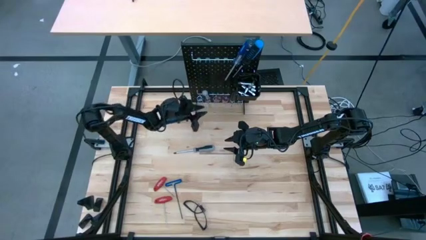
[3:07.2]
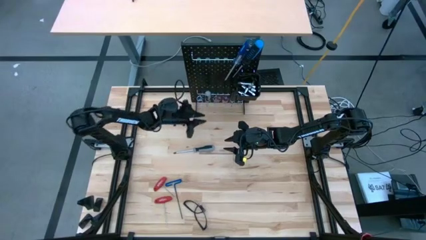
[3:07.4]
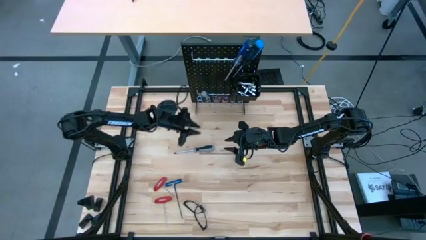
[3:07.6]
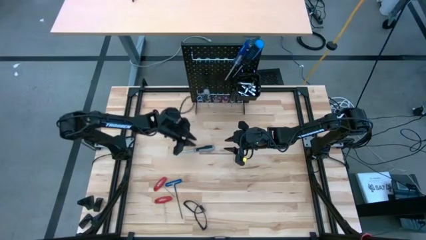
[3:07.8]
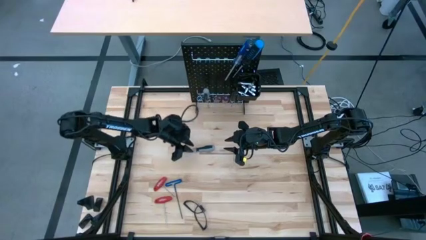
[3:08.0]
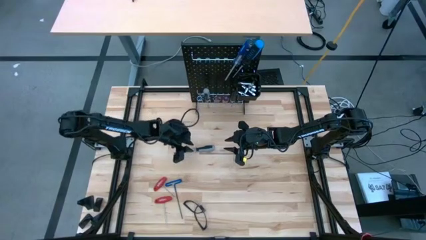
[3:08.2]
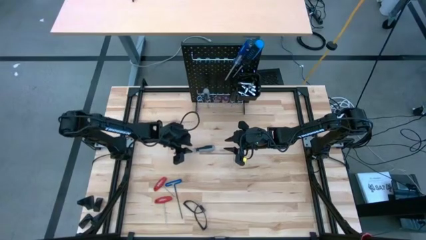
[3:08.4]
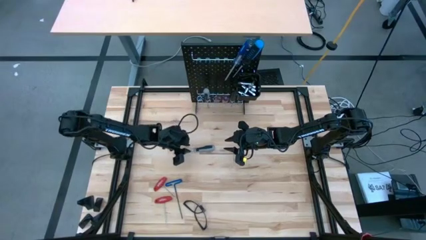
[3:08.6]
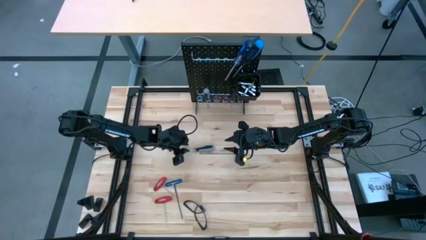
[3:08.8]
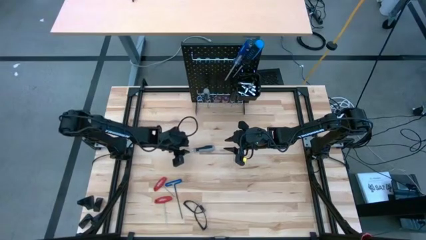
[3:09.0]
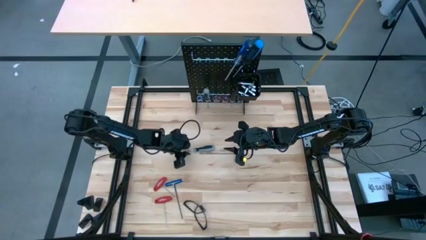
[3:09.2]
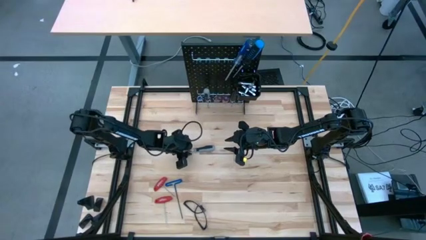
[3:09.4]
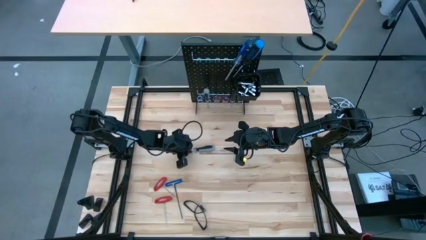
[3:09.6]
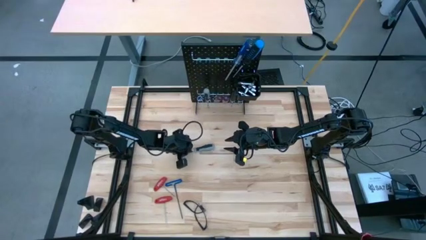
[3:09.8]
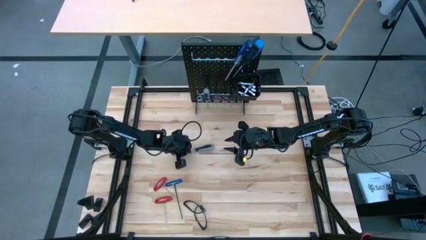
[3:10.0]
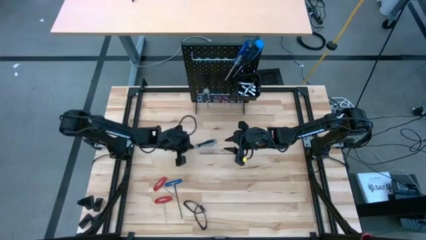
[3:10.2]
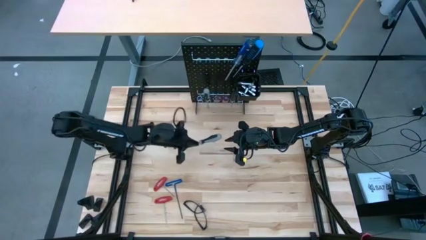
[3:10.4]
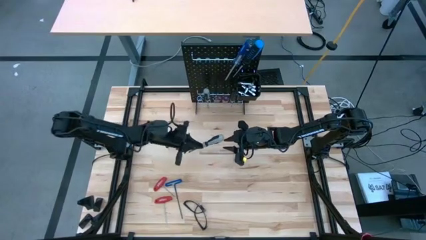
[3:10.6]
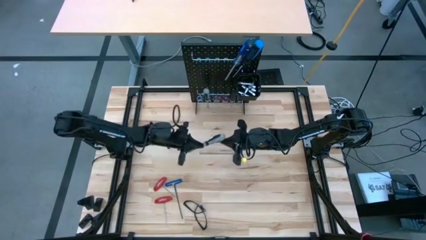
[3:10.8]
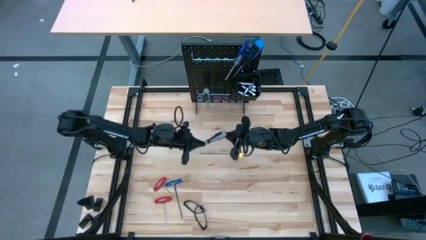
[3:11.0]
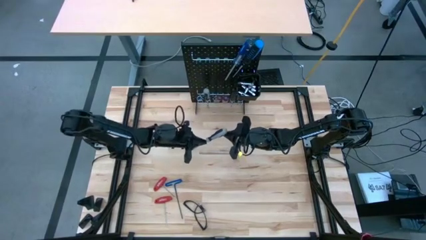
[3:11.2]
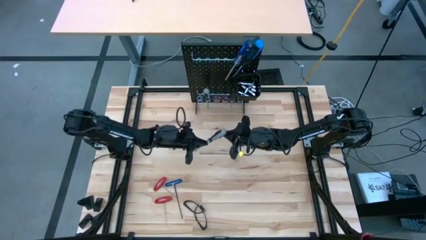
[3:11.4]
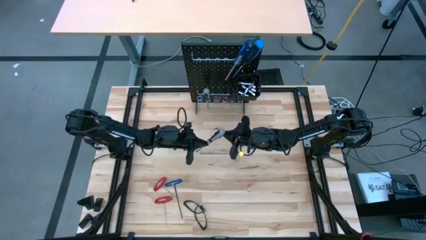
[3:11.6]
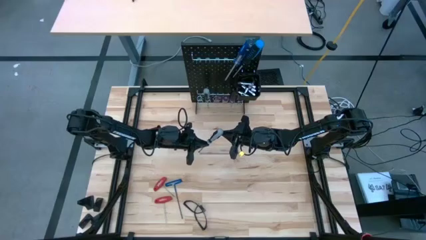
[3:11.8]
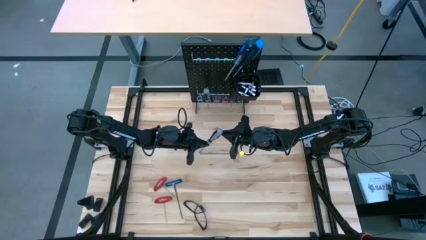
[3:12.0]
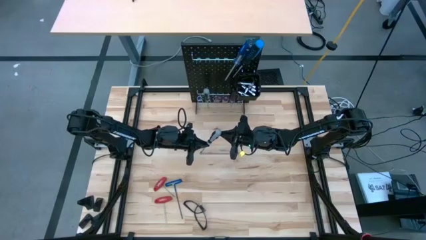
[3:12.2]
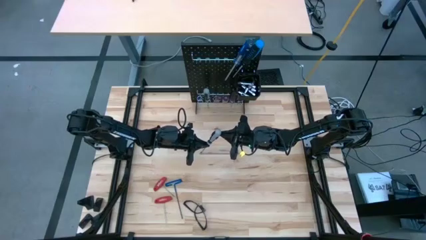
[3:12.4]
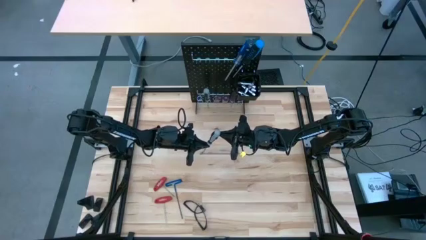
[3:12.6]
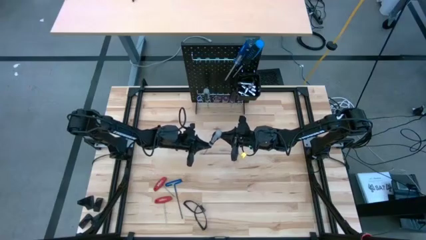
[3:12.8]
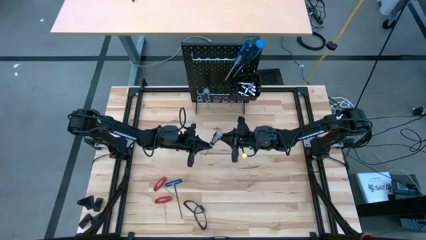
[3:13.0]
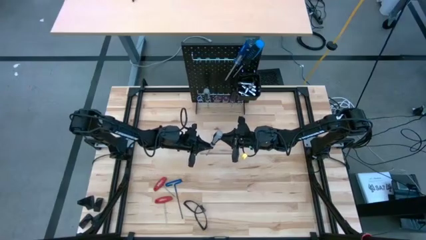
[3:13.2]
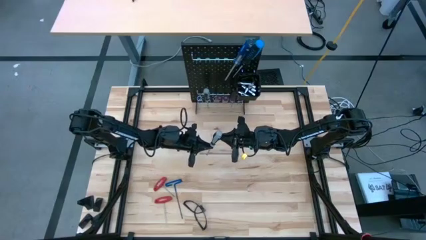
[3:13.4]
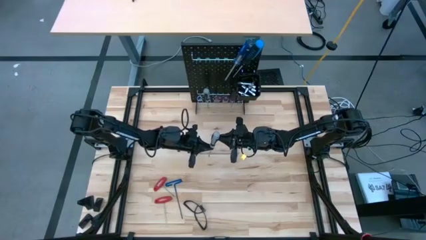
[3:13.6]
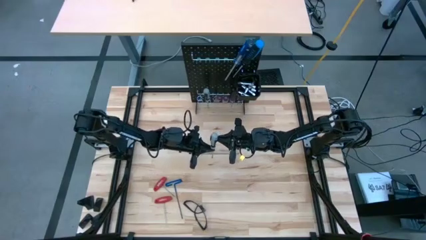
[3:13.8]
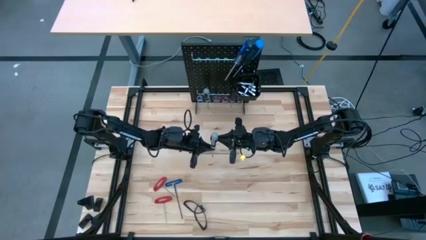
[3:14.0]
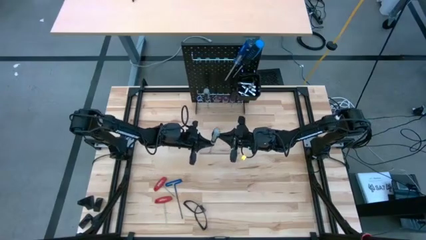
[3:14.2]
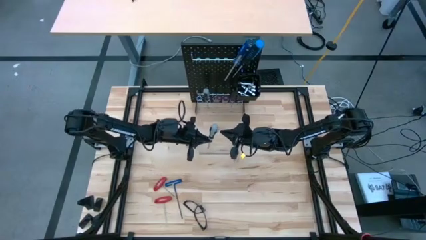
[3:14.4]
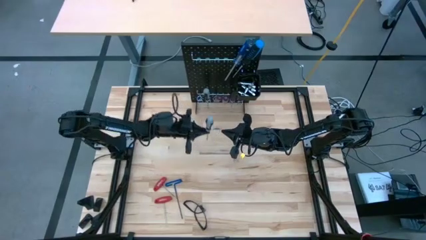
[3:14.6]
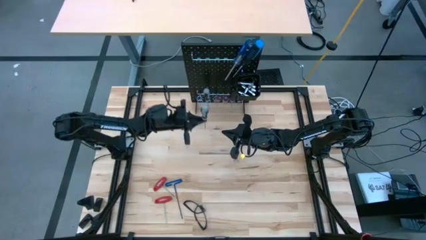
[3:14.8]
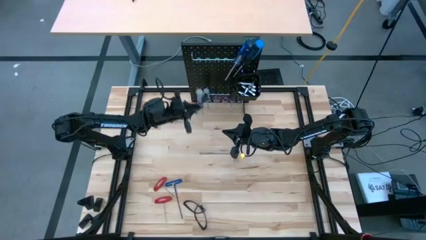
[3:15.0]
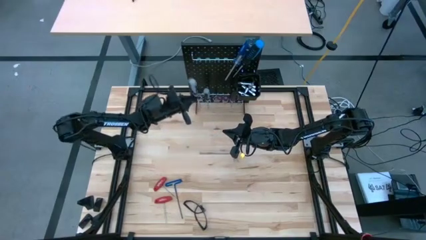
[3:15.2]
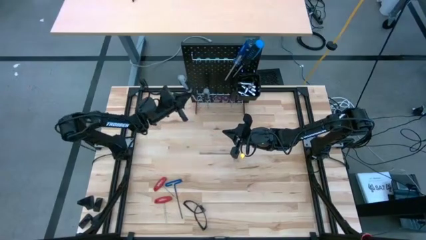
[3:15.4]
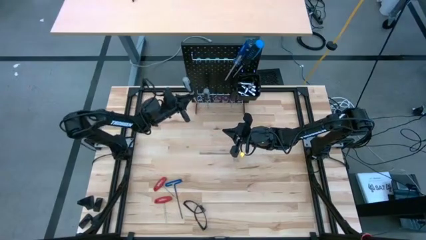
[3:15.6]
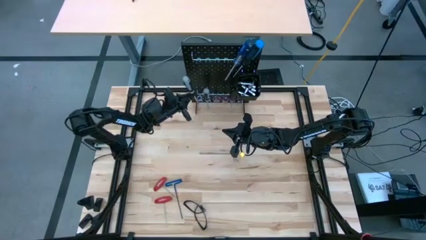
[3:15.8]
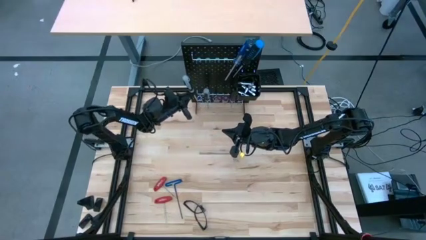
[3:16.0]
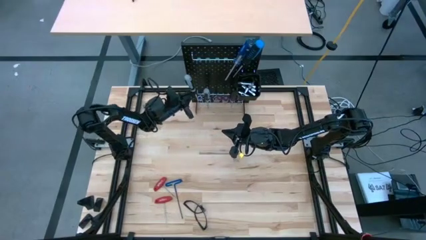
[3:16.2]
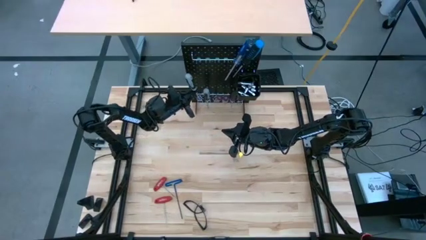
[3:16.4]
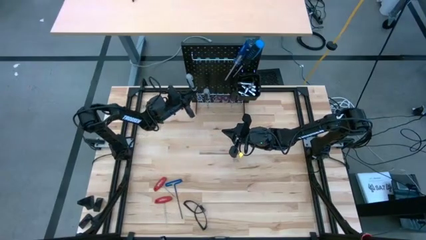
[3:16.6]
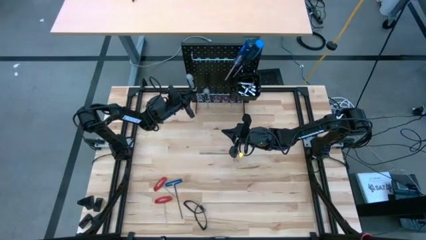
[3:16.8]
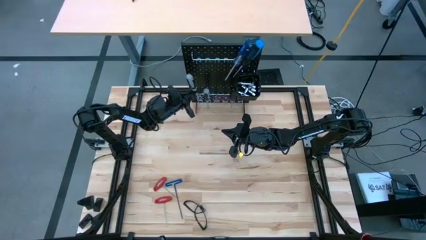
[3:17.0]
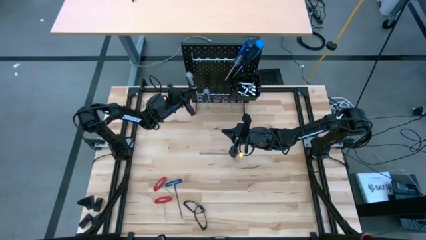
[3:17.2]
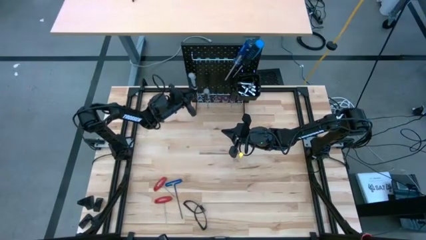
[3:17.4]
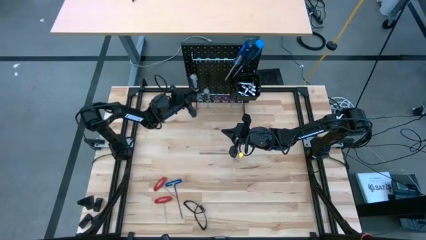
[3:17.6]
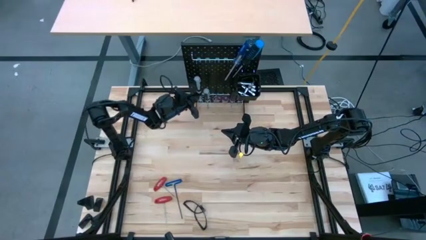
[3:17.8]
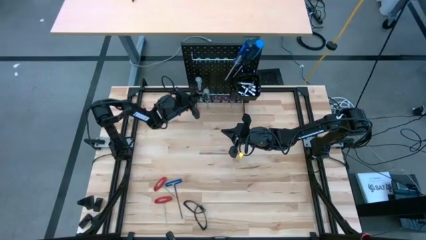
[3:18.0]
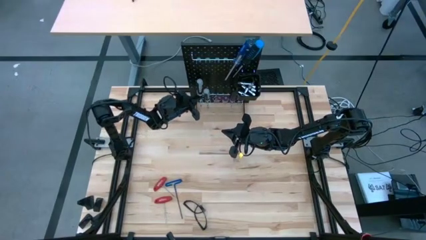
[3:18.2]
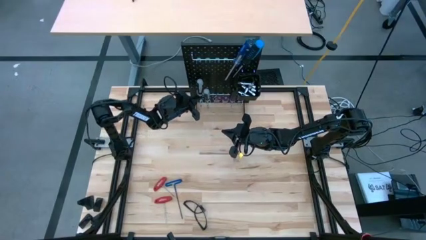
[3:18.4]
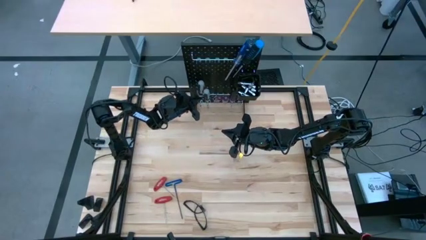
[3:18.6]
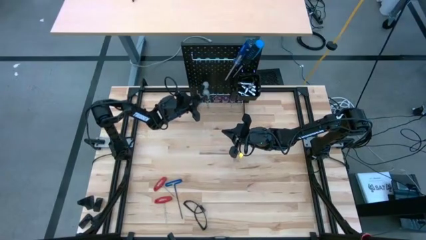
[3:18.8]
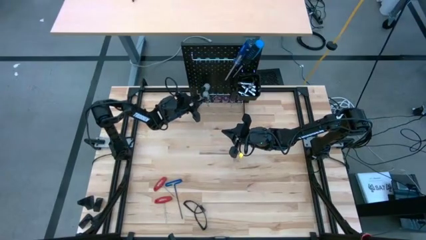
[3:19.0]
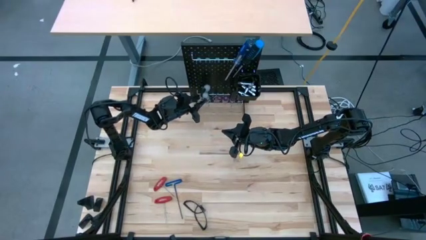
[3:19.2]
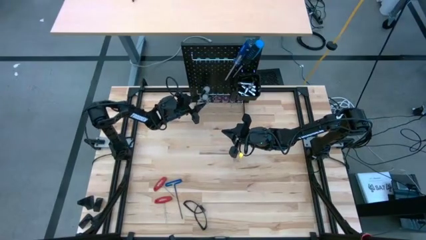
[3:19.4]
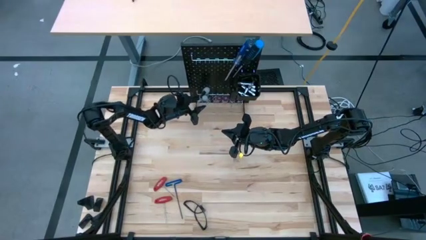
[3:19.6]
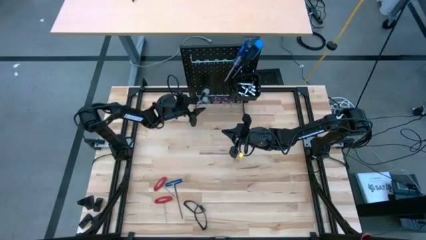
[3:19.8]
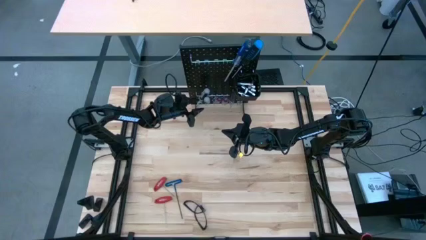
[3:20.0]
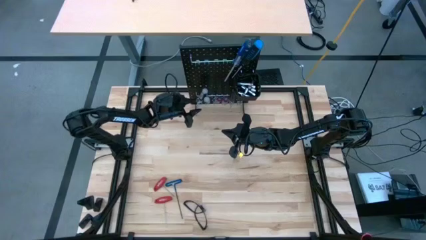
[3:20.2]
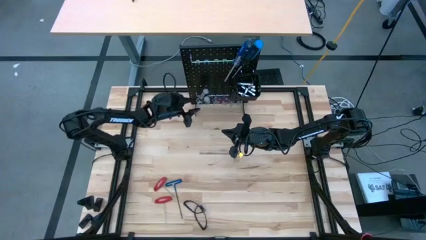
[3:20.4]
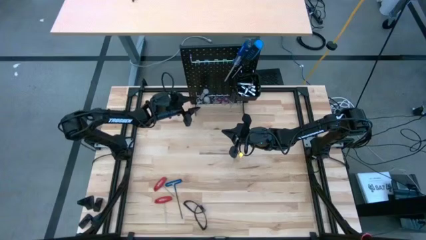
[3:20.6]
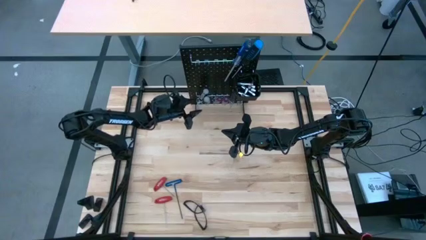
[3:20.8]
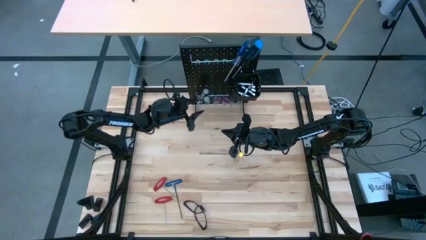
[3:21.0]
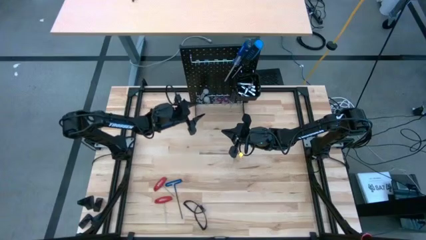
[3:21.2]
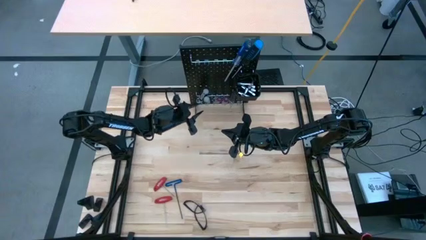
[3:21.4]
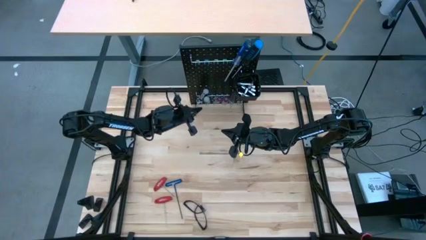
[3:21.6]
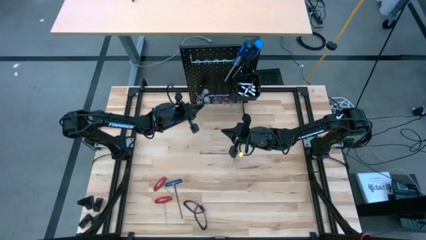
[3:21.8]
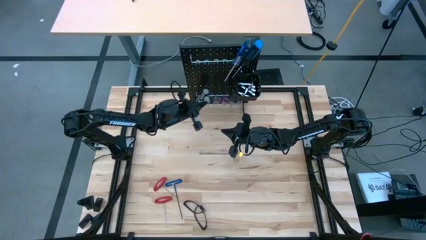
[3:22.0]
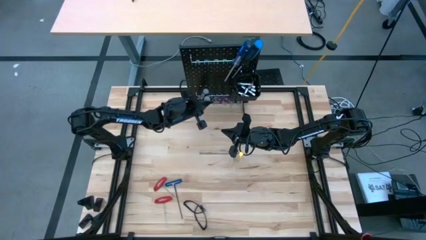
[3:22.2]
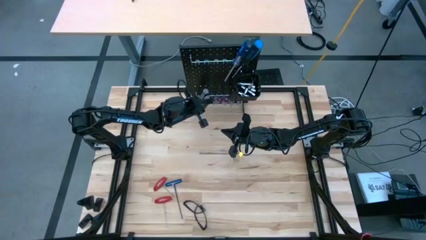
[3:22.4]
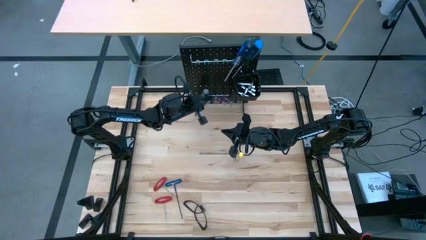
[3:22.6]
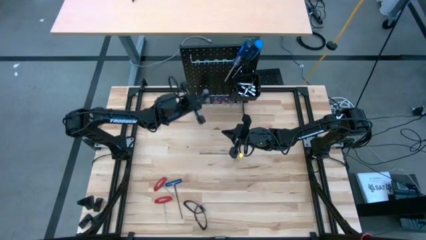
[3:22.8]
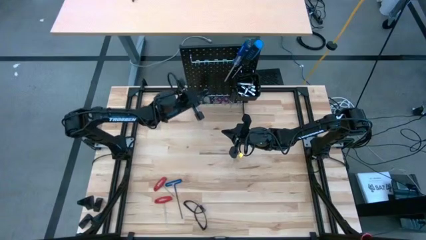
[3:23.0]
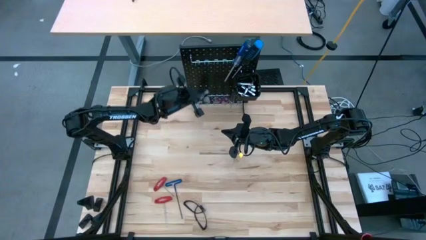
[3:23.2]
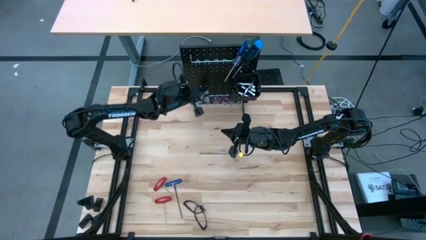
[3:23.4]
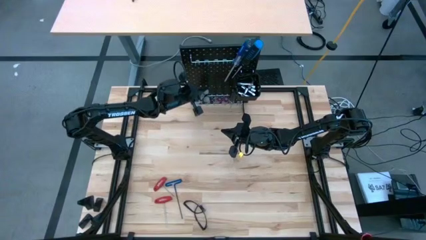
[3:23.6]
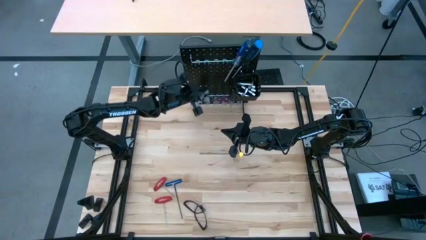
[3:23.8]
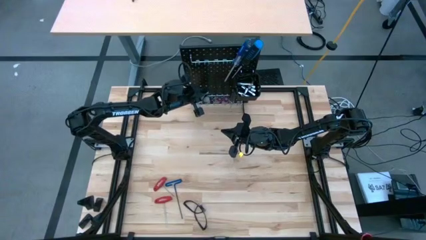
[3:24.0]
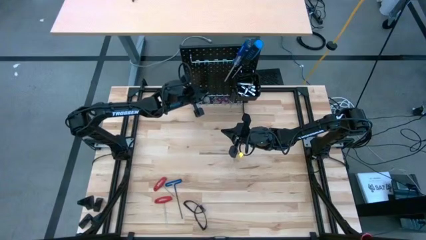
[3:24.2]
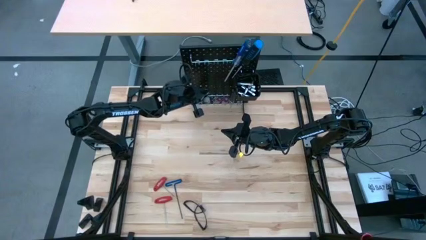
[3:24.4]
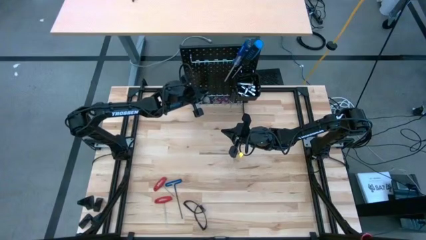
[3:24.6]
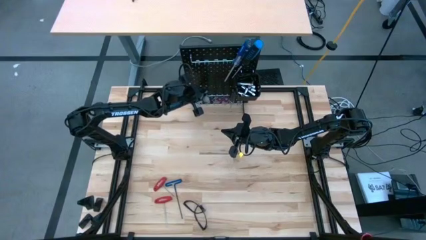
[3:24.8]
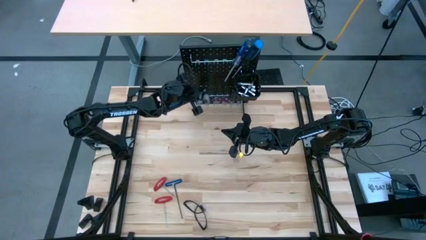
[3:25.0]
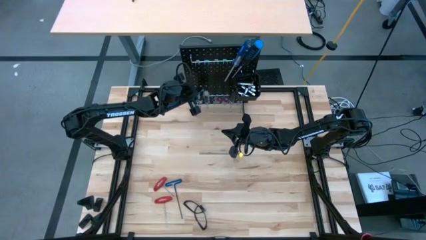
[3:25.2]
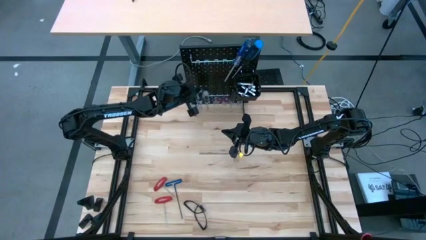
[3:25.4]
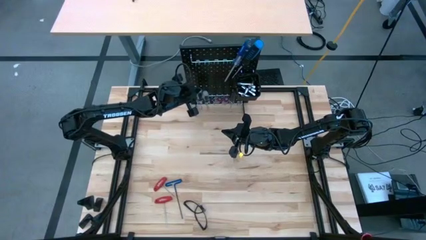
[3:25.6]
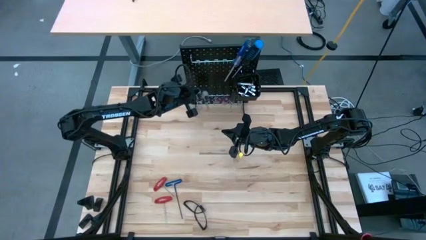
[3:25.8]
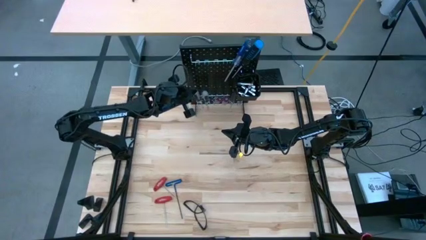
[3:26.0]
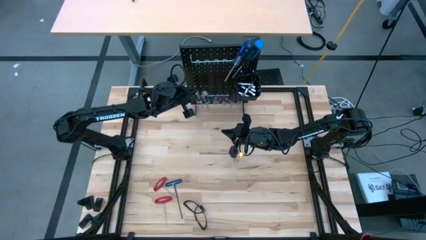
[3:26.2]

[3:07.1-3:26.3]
Task: Hang tools onto peg board
Hang the gray screwdriver on the pegboard
